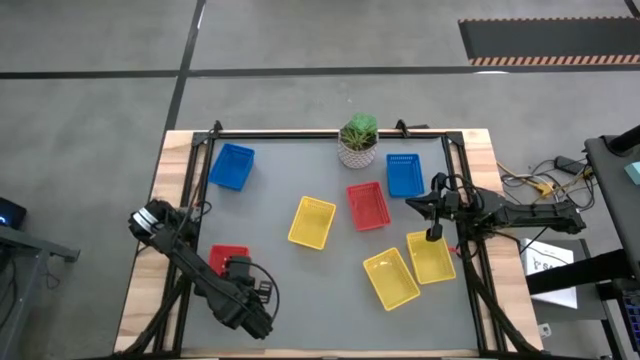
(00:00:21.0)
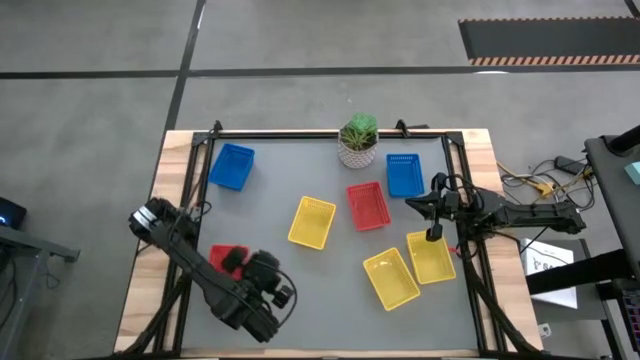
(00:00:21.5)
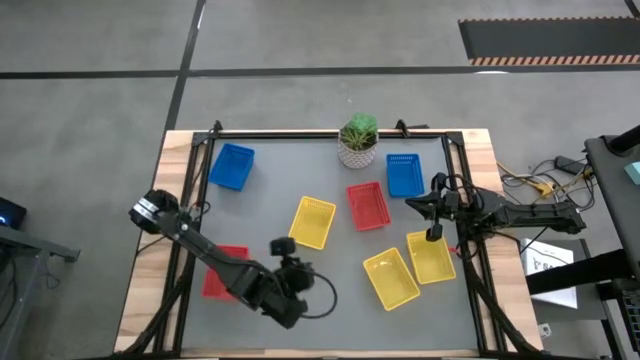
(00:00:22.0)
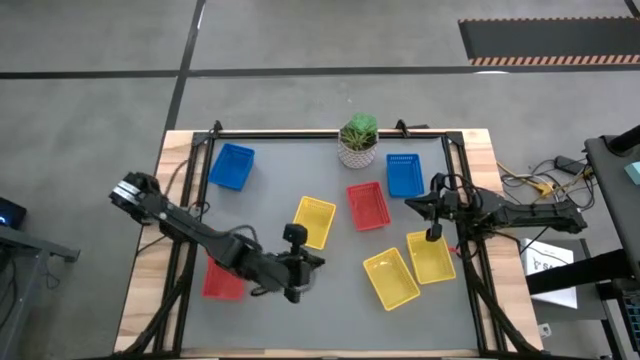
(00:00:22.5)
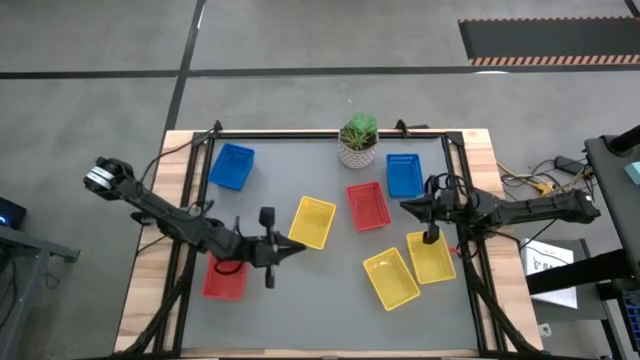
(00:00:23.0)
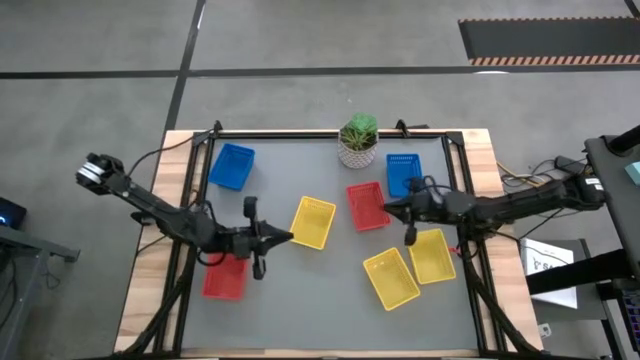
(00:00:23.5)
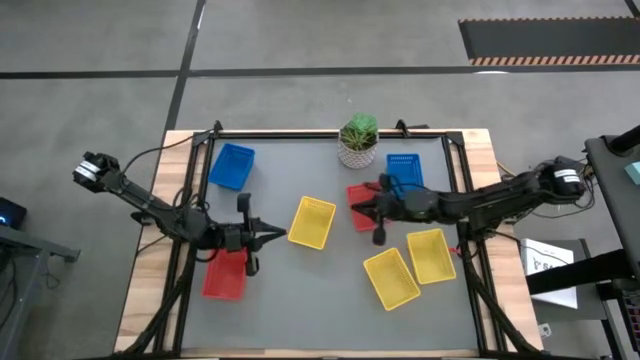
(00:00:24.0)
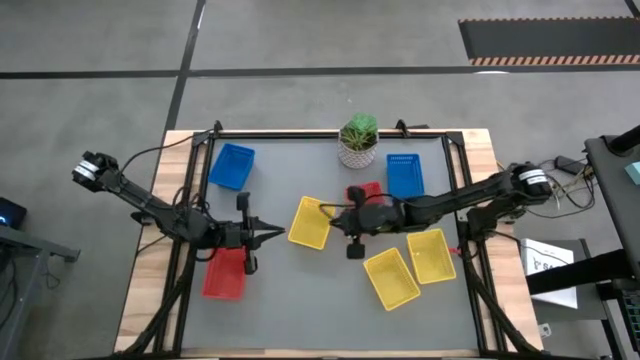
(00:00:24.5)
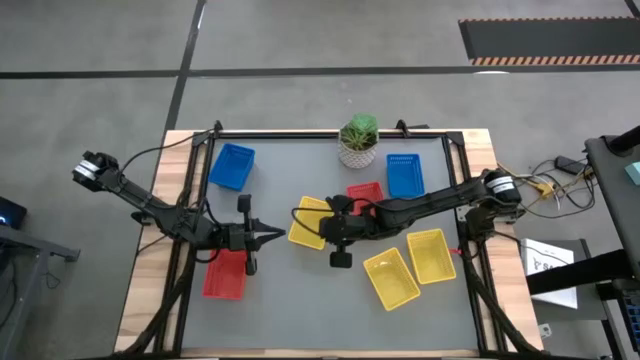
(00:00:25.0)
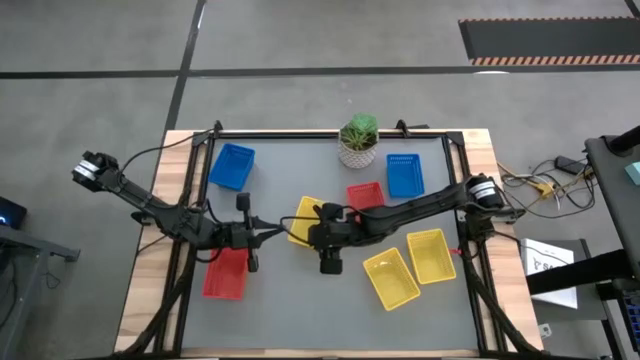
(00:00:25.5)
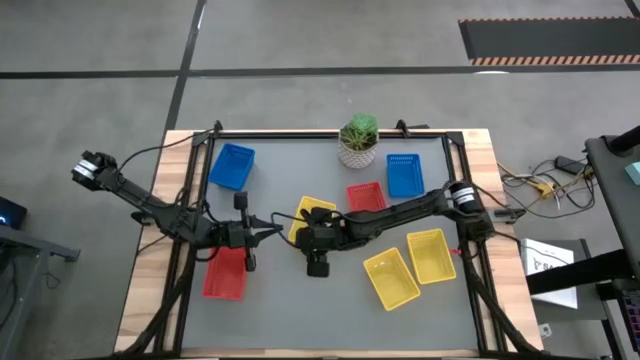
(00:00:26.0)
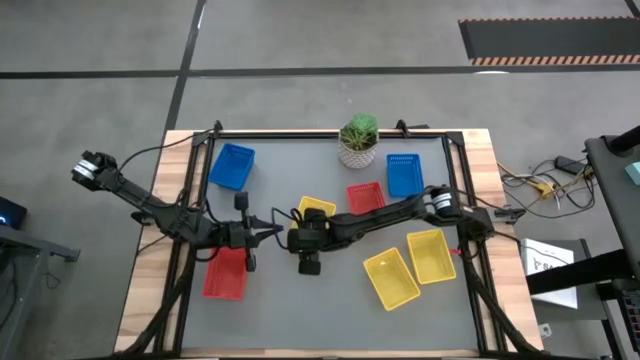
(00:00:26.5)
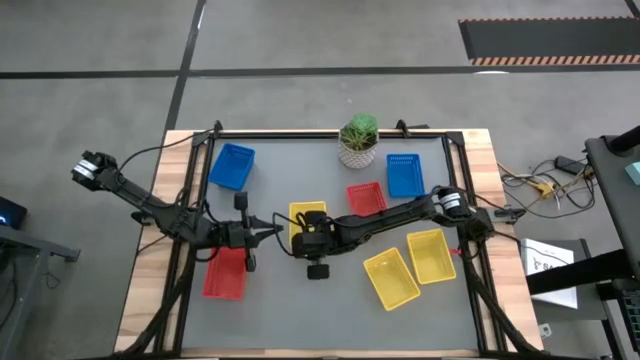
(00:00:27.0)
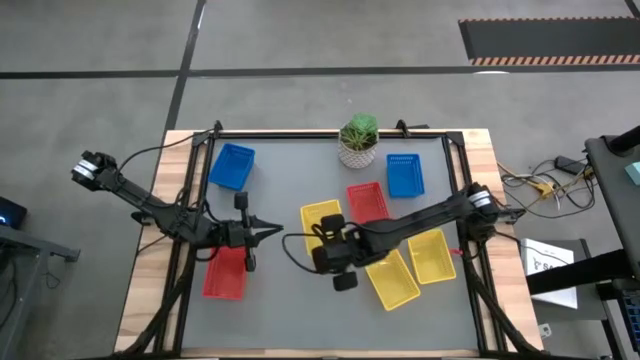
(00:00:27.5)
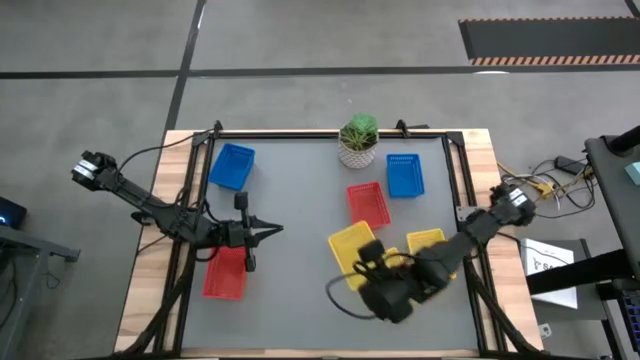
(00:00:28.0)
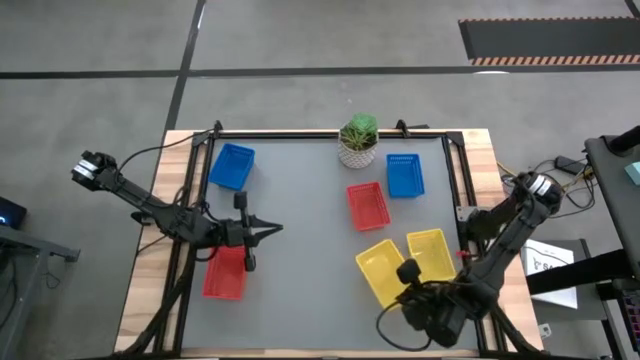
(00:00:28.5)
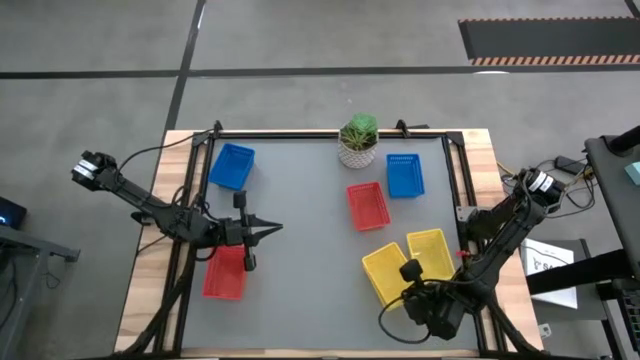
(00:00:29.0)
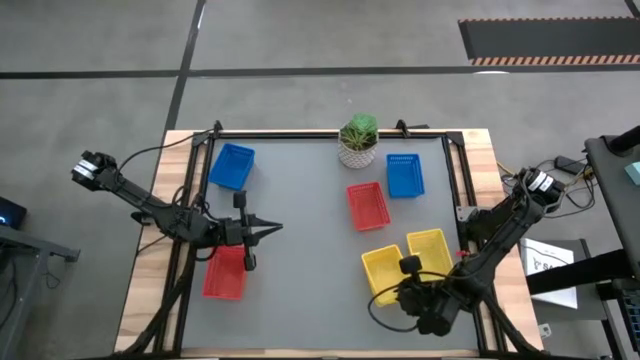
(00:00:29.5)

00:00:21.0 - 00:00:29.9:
Stack the top yellow bin on top of the bottom left yellow bin

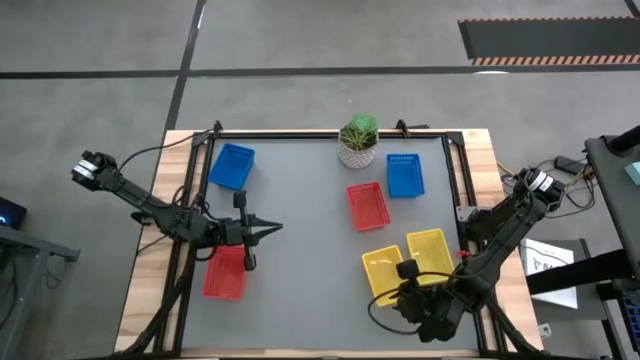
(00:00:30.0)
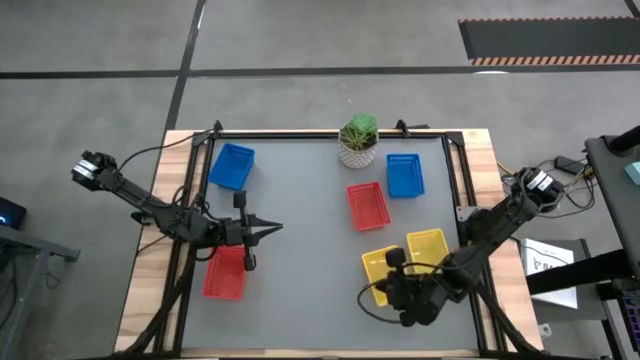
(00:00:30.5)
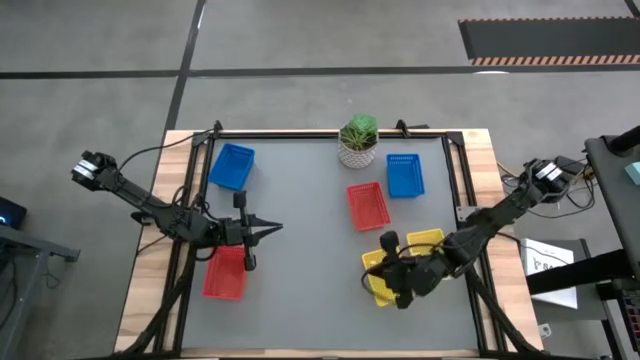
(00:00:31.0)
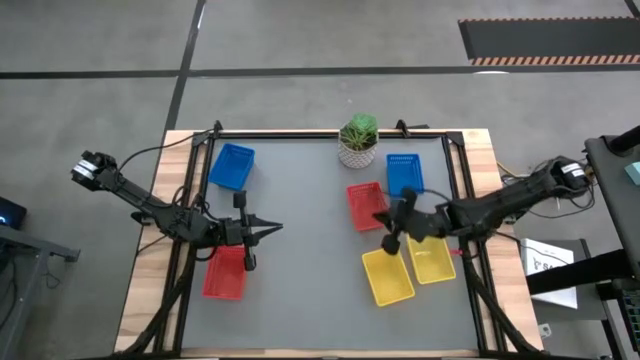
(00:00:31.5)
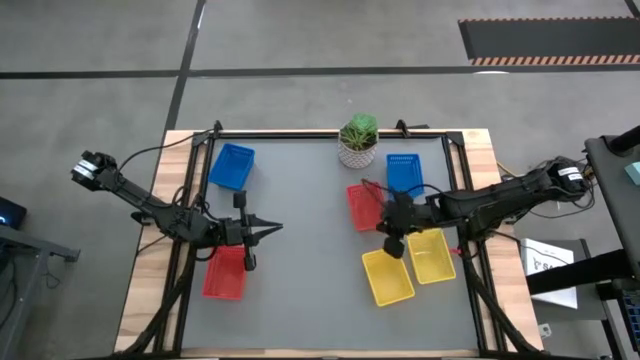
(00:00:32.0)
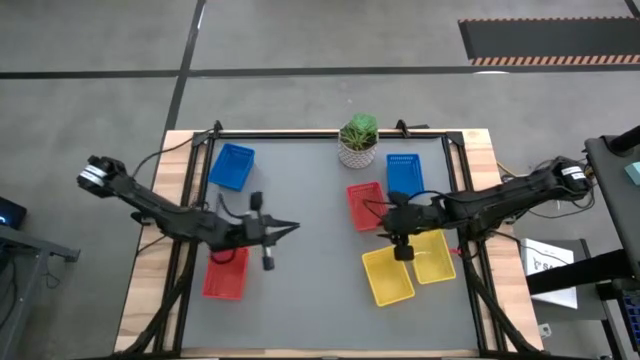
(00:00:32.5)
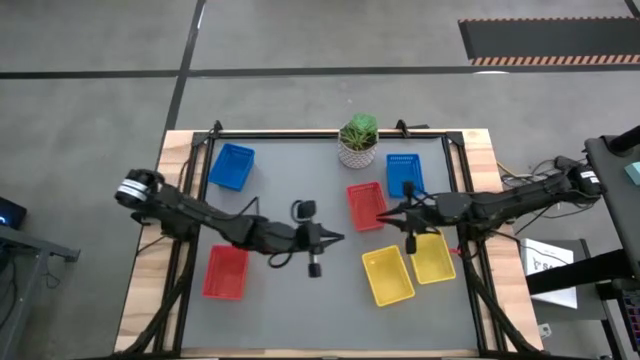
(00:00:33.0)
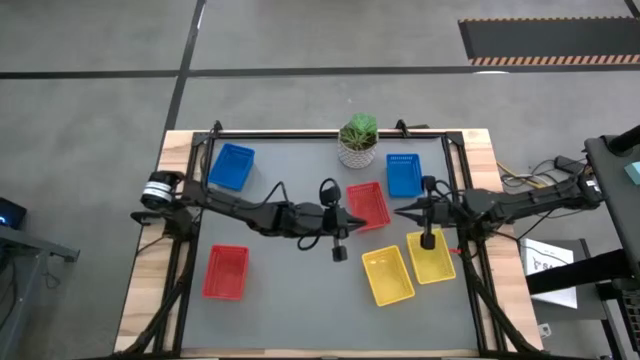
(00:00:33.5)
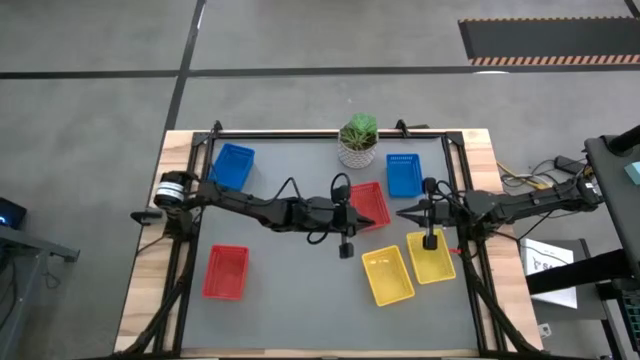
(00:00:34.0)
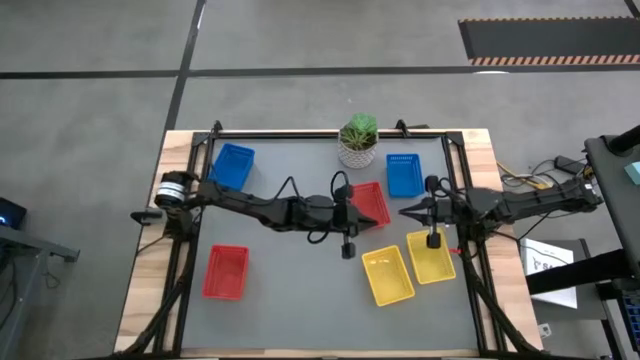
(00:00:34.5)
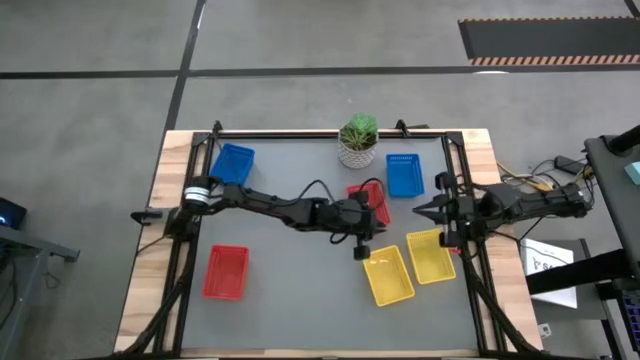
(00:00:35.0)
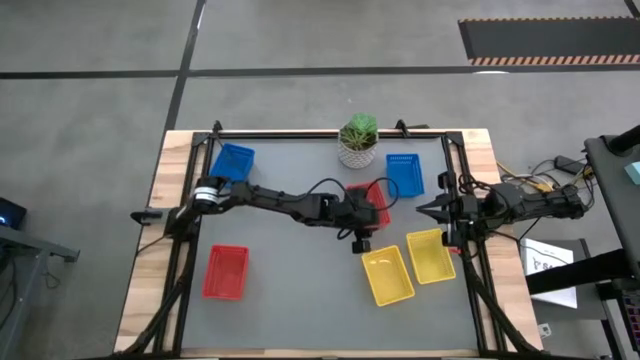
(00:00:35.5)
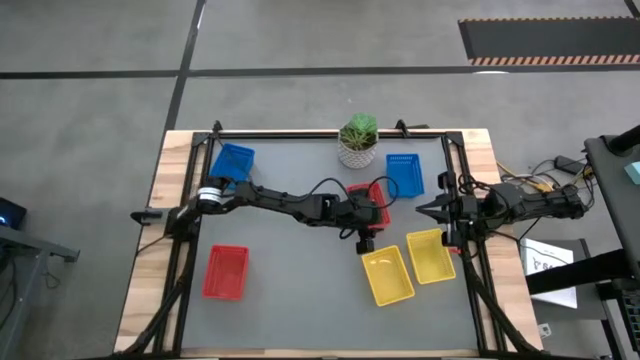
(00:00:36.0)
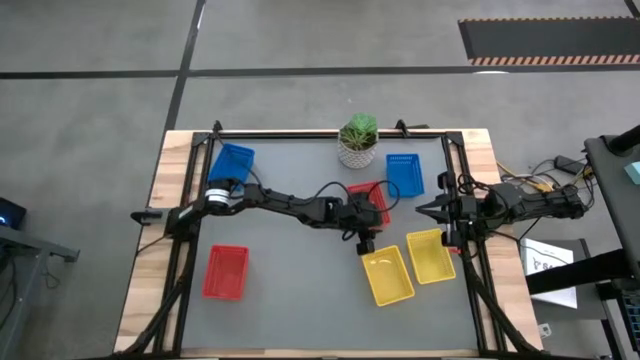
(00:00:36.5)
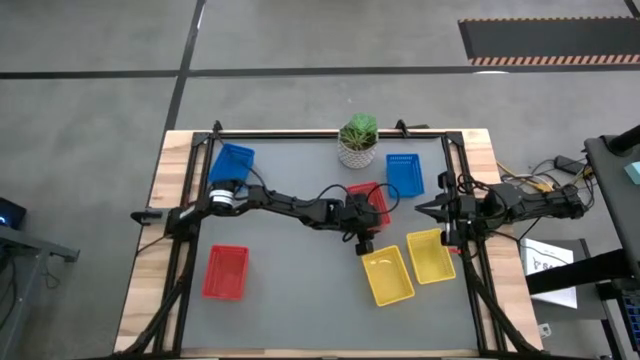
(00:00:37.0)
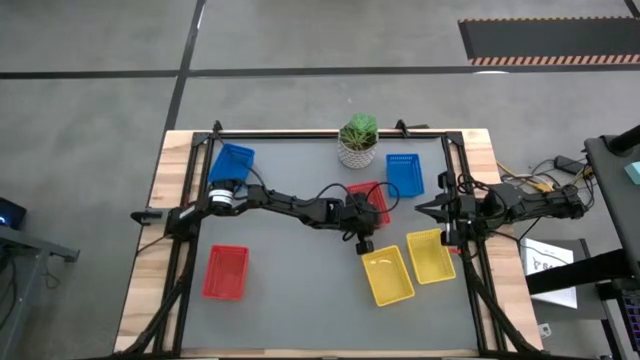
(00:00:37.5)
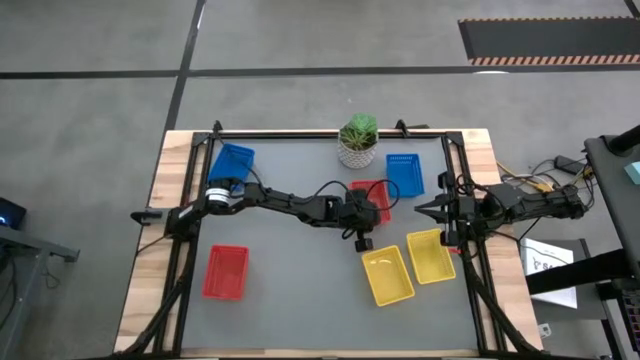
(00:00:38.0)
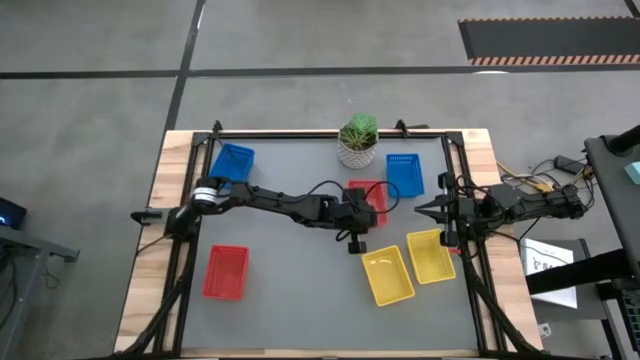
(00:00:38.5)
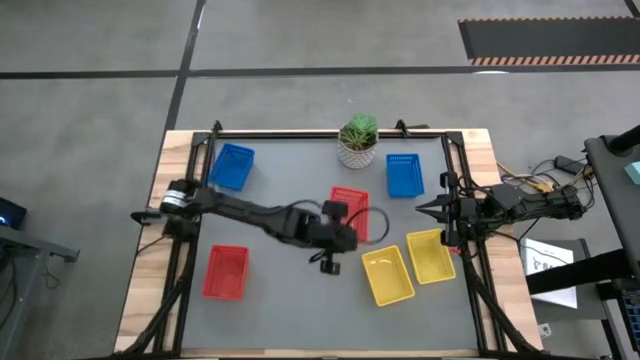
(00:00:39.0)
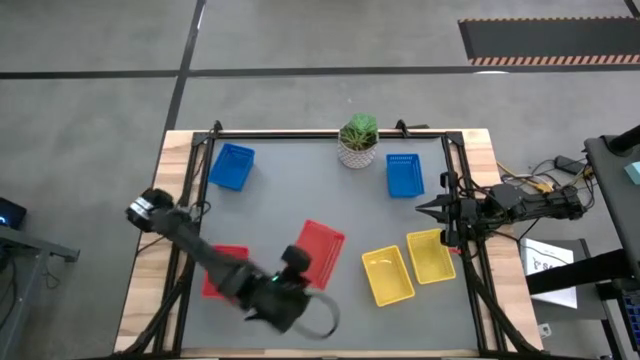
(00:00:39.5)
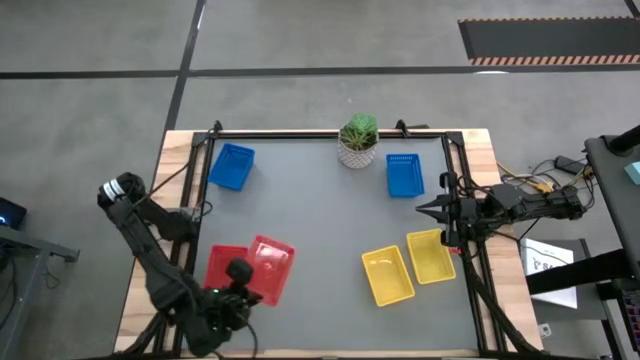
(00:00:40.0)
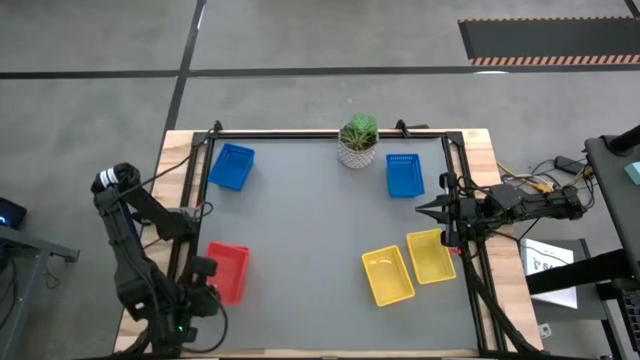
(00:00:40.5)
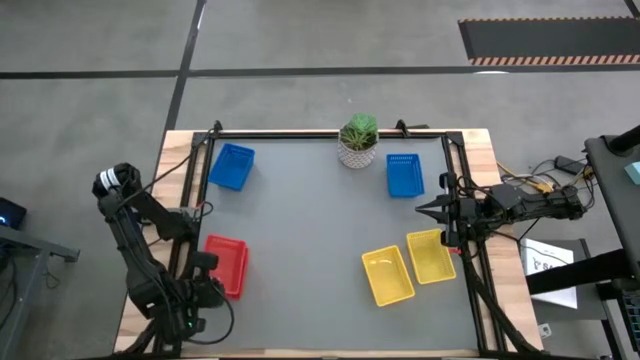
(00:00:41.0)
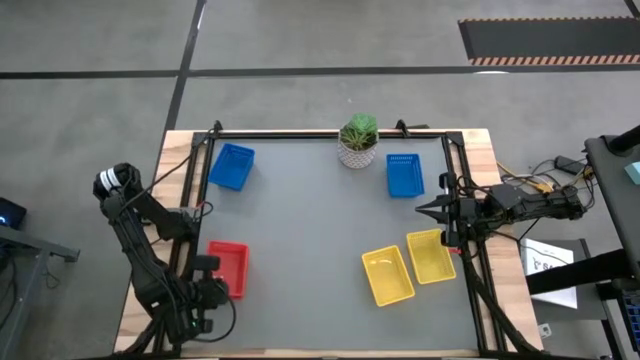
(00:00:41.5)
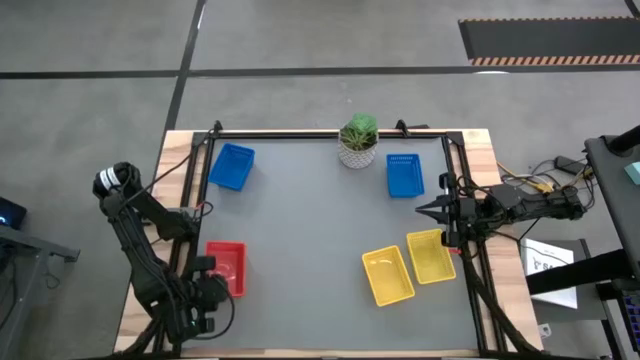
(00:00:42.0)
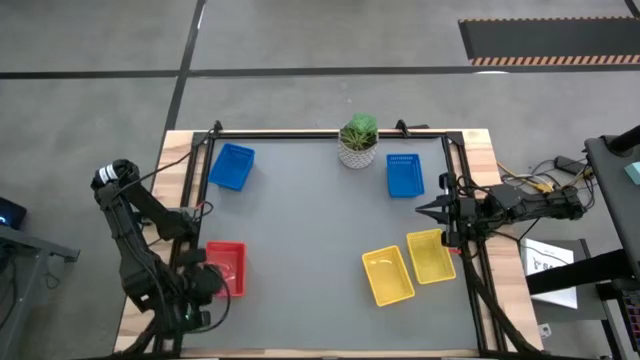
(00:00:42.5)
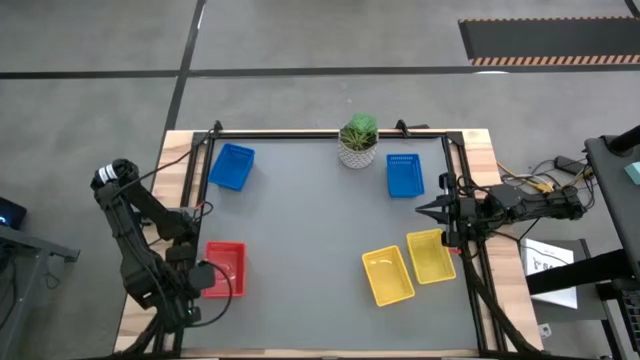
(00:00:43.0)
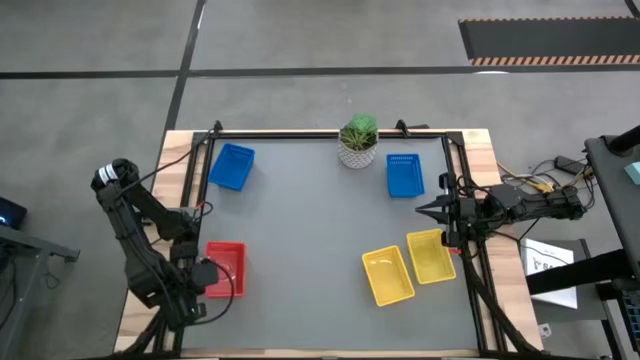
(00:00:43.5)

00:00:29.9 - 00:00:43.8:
Stack the right red bin on top of the left red bin
